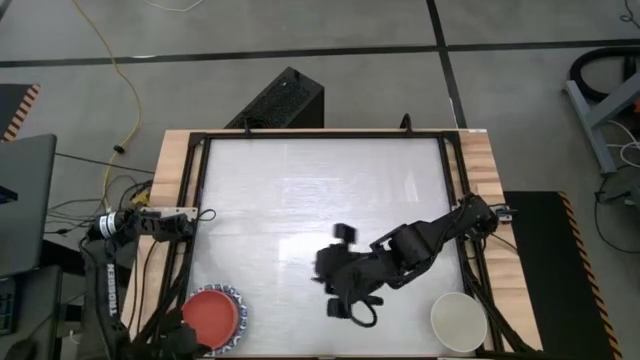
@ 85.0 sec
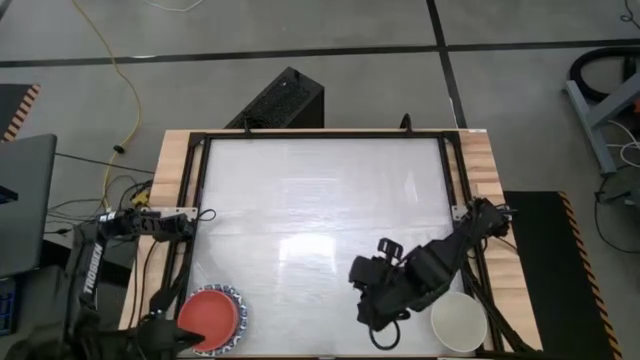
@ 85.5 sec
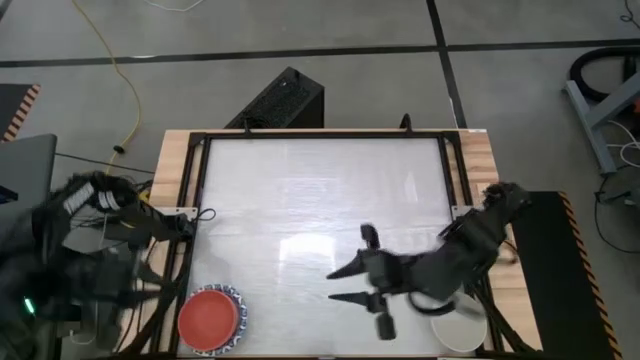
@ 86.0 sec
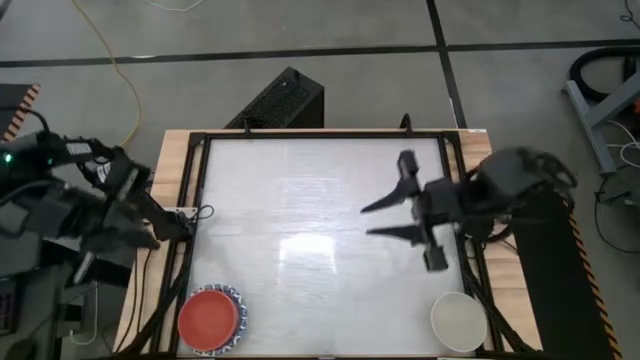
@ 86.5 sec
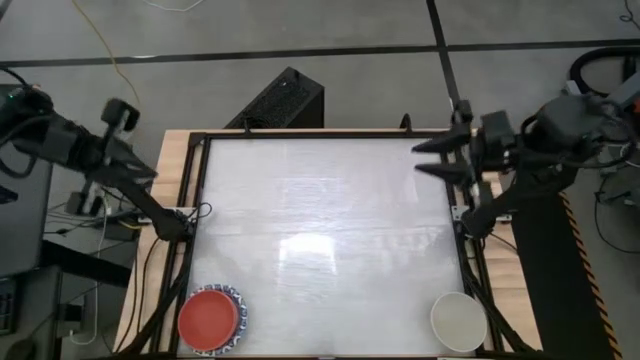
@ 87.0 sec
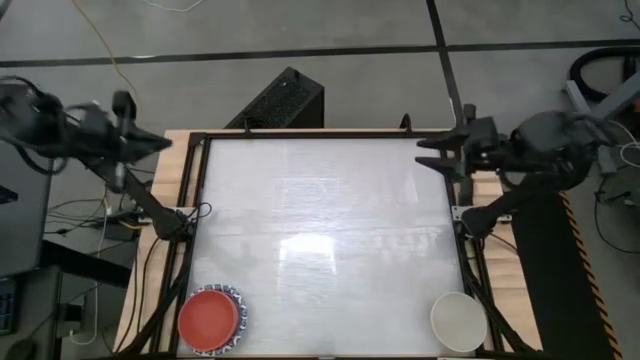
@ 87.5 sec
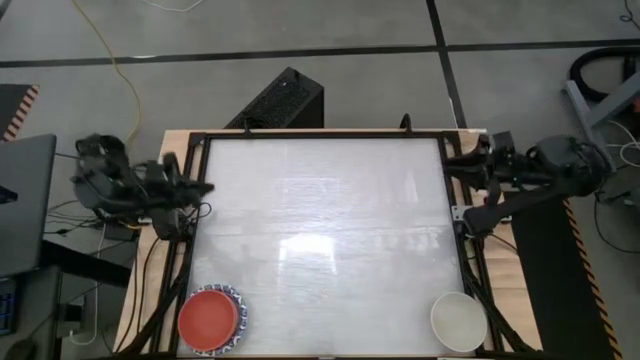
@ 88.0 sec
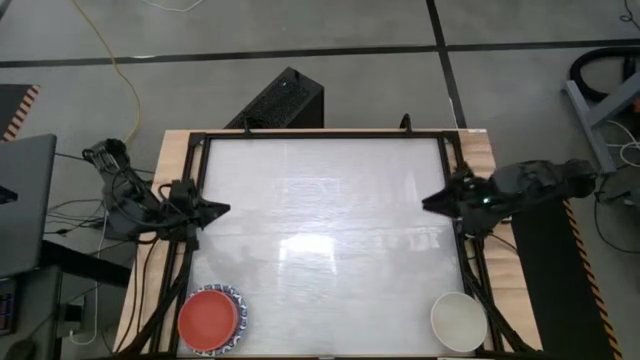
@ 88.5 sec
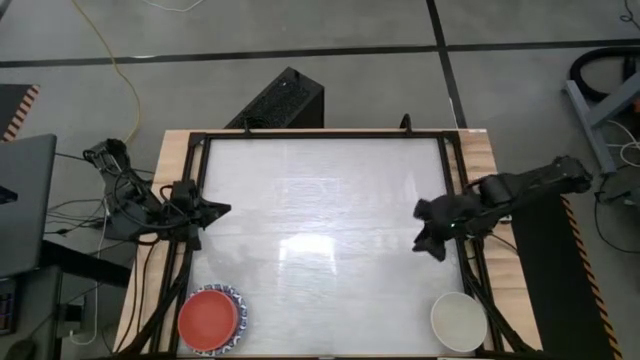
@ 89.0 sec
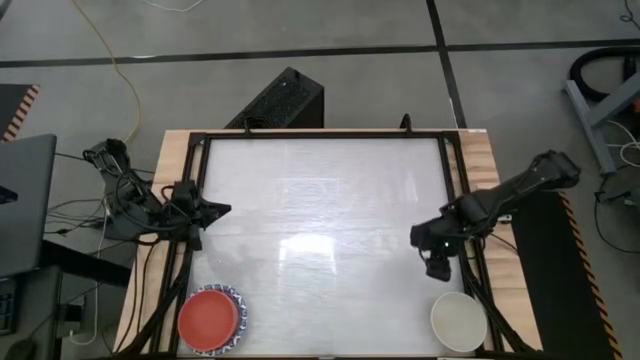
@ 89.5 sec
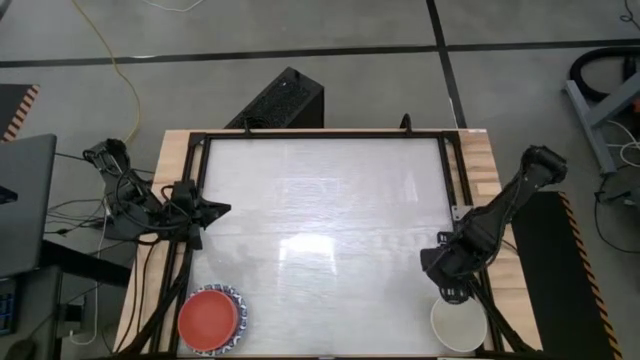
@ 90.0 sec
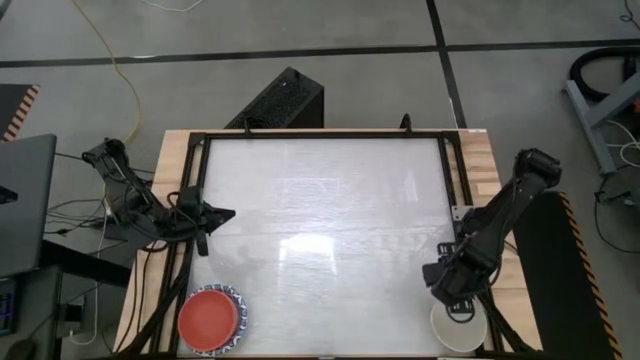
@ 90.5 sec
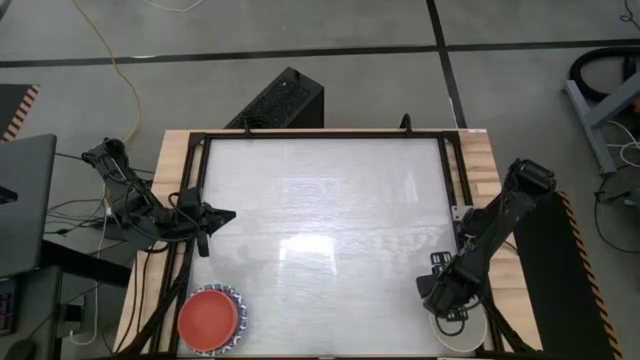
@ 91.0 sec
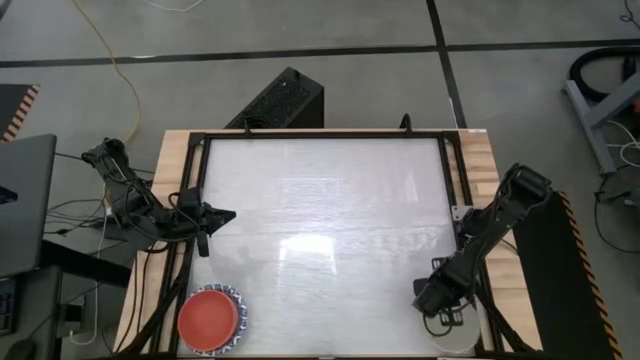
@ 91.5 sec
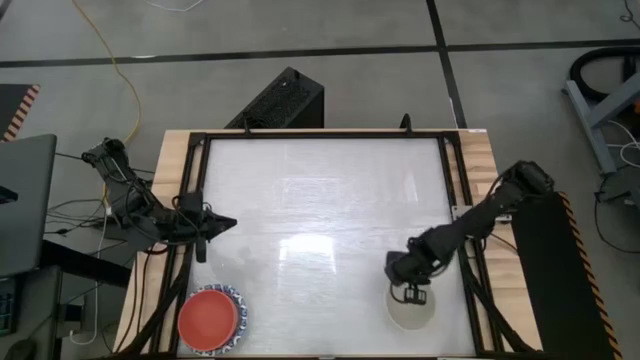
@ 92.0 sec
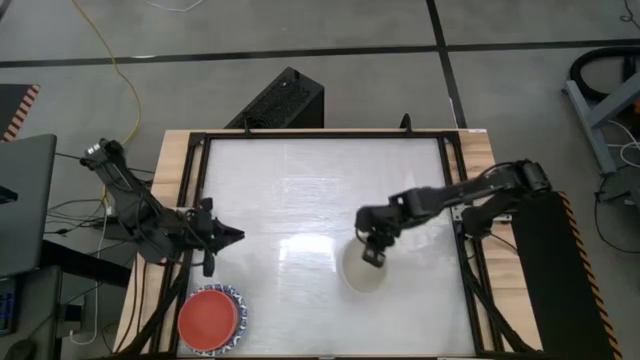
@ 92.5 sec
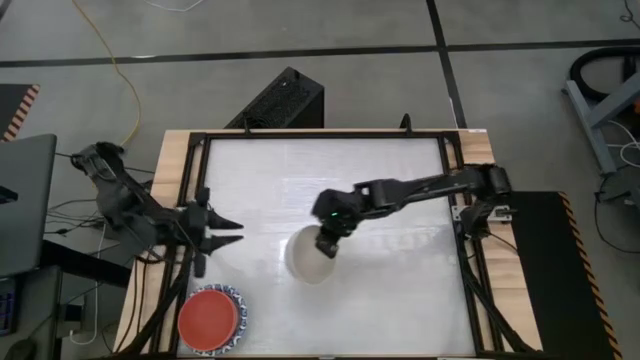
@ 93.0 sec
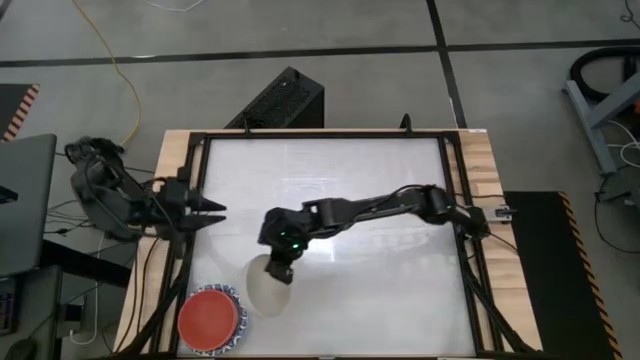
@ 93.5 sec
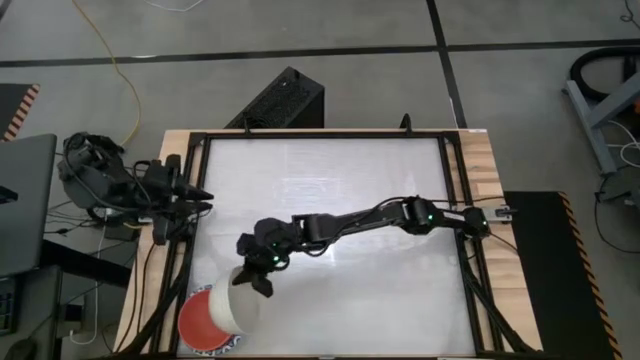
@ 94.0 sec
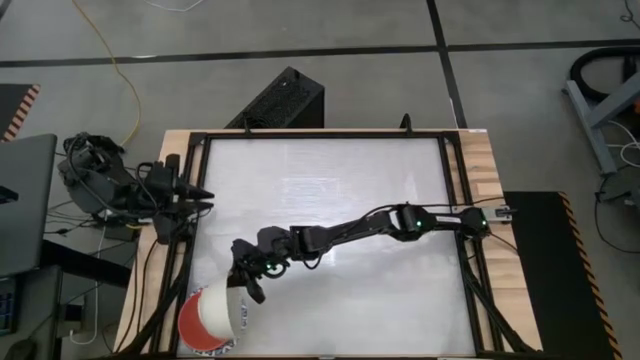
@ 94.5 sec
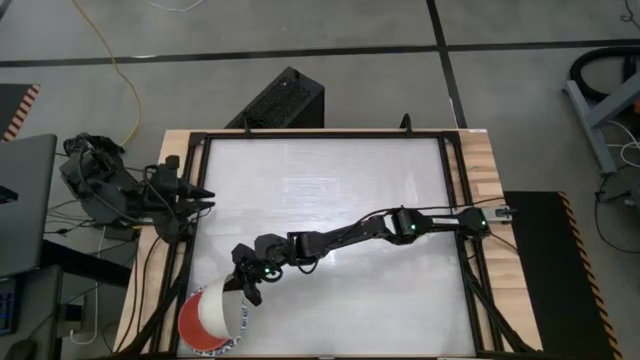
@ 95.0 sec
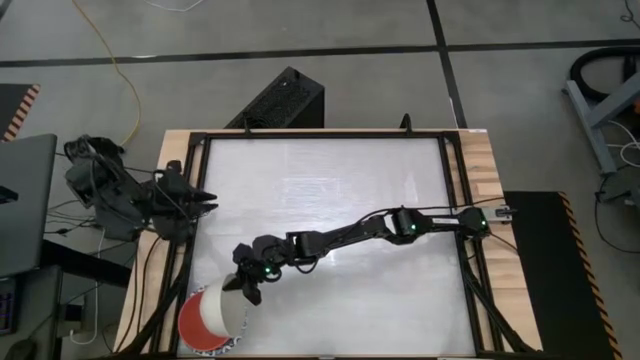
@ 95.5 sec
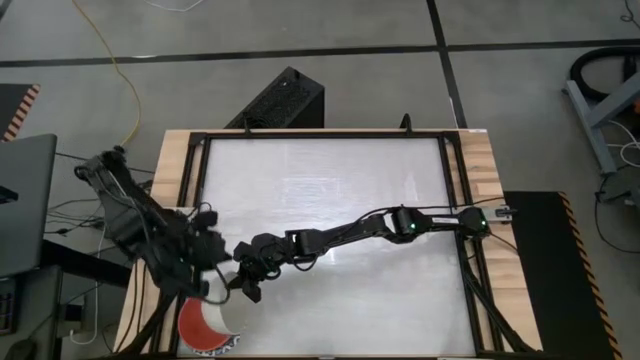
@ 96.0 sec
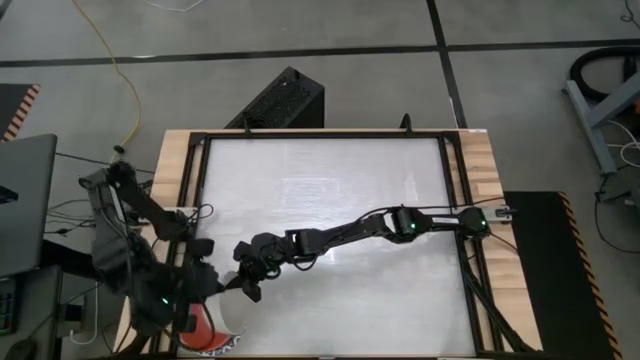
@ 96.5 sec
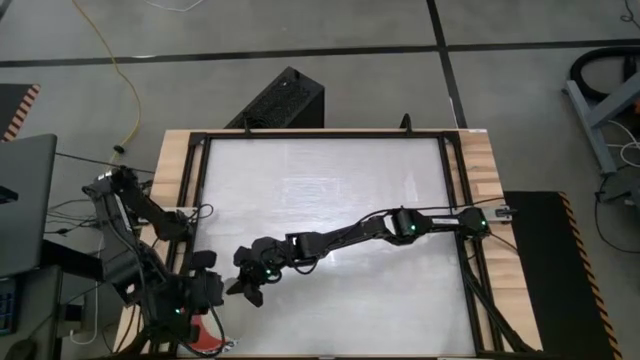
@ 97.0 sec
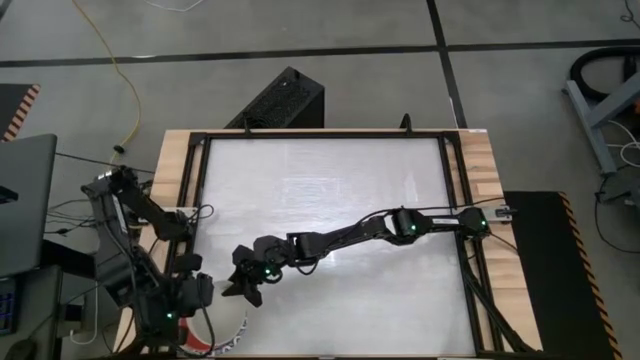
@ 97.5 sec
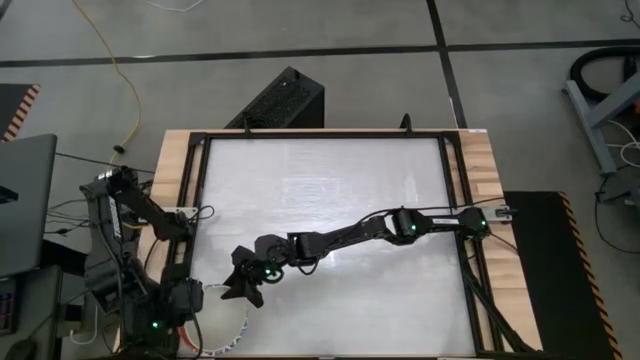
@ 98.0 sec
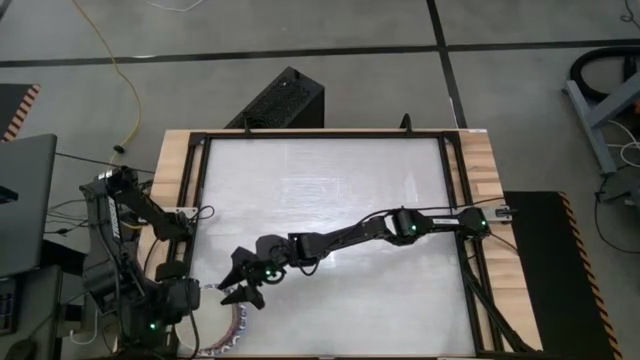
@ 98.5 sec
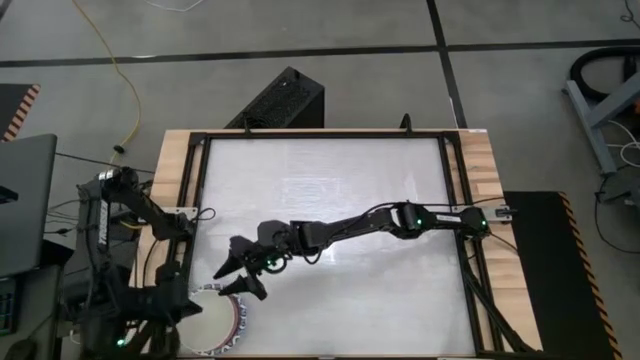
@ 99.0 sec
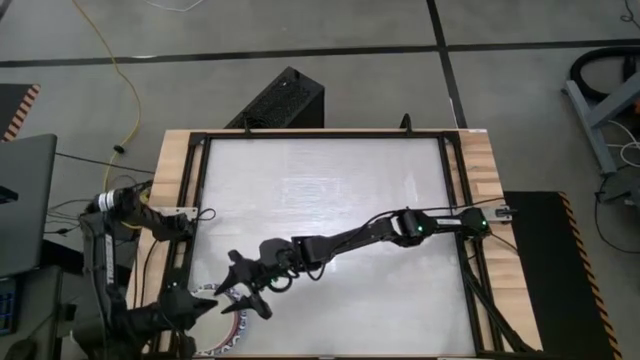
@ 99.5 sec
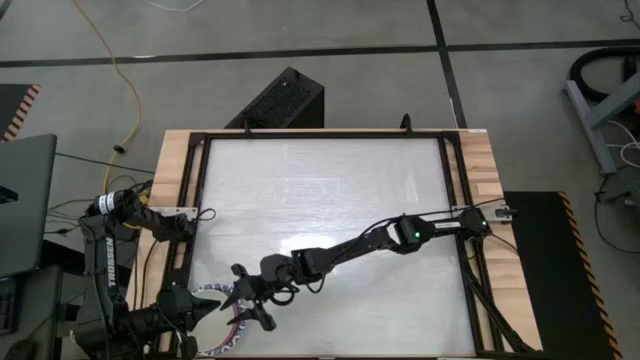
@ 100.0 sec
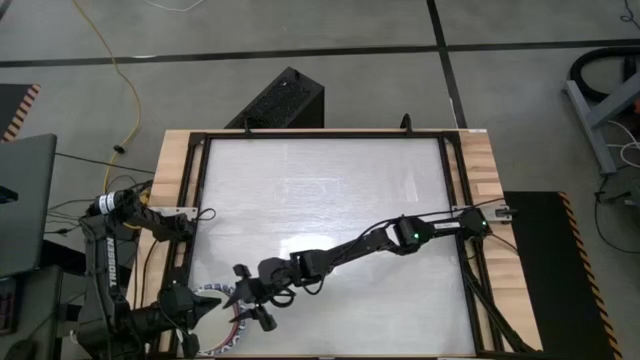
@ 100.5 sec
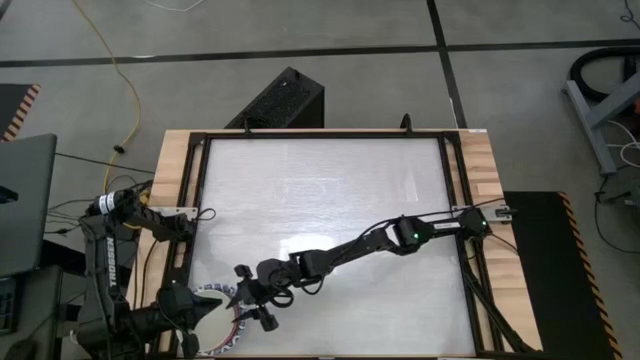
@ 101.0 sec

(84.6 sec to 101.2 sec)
Task: Nest bowls inside each other by size order
Stack the gray bowl onto the orange bowl
